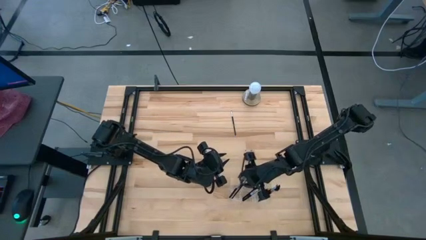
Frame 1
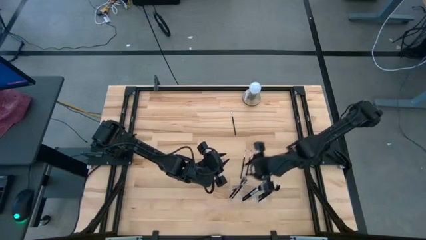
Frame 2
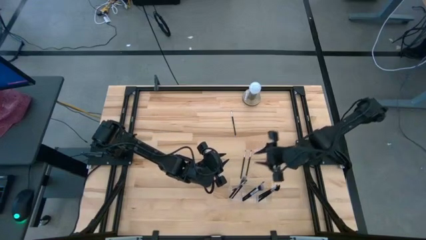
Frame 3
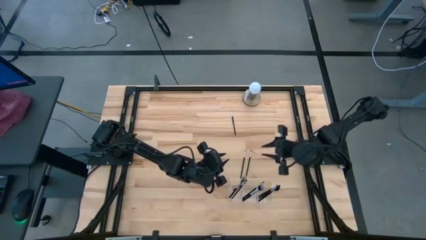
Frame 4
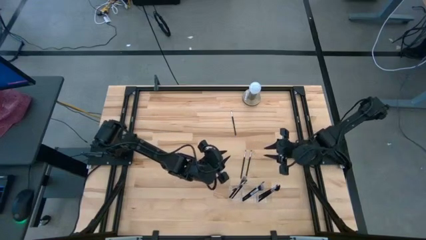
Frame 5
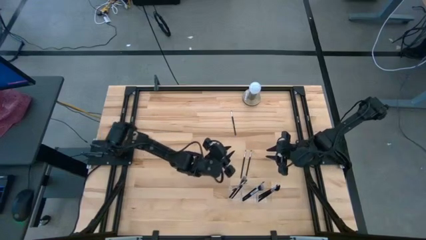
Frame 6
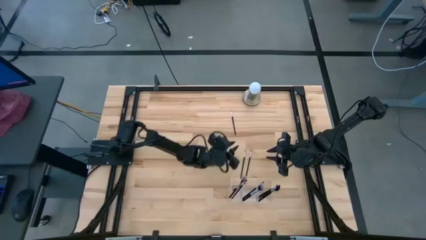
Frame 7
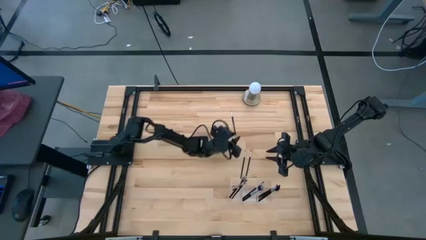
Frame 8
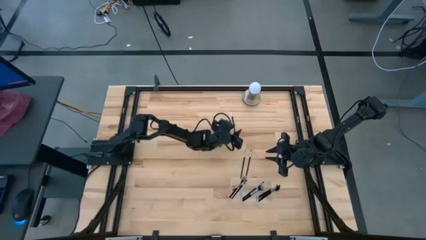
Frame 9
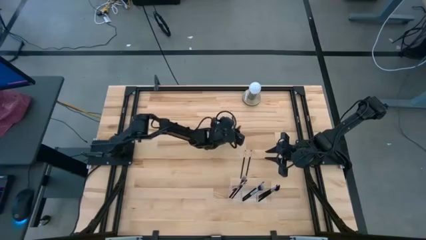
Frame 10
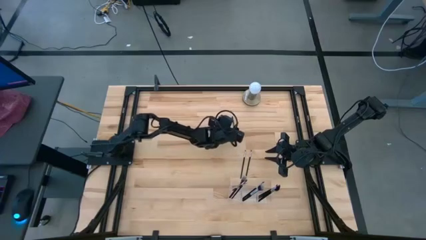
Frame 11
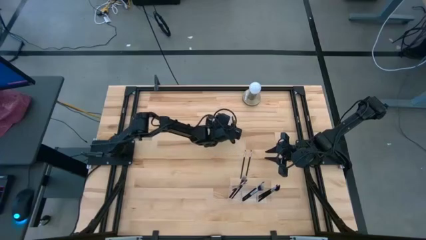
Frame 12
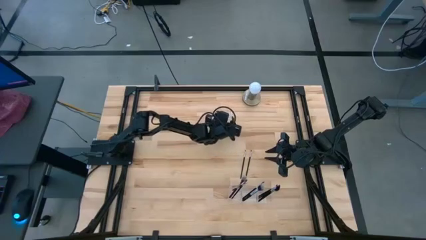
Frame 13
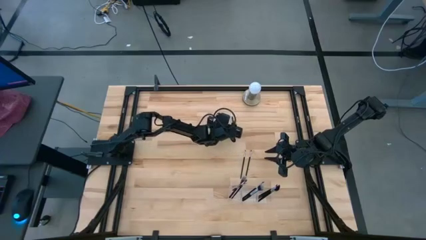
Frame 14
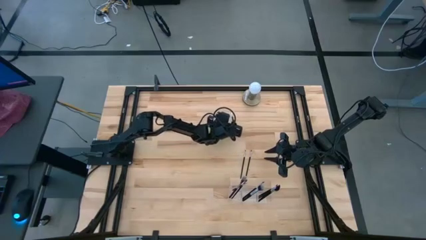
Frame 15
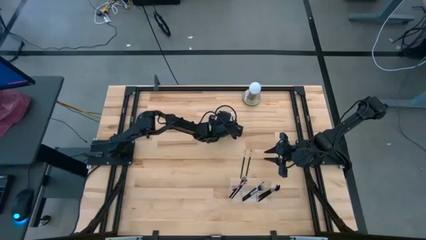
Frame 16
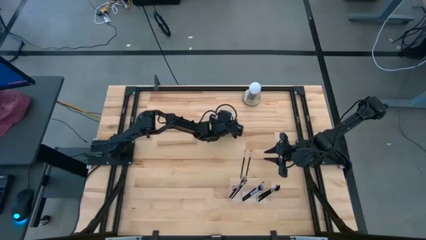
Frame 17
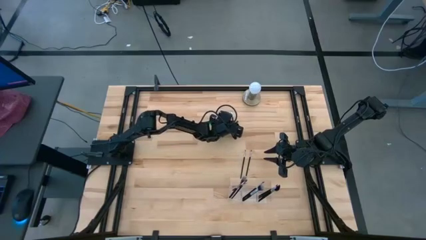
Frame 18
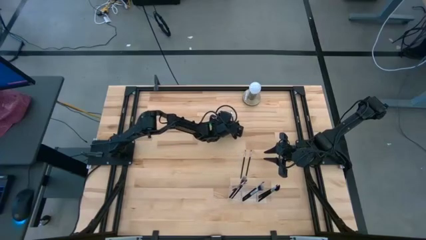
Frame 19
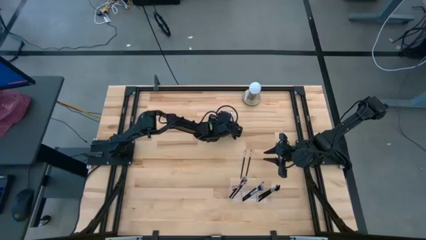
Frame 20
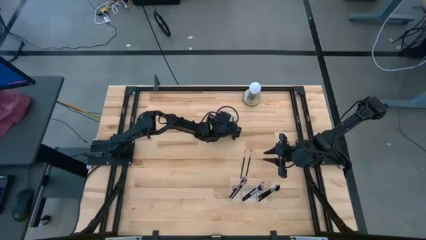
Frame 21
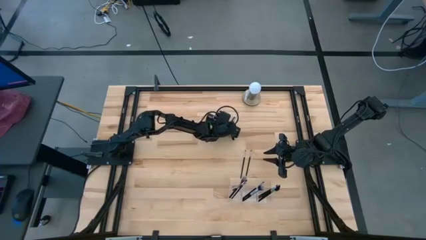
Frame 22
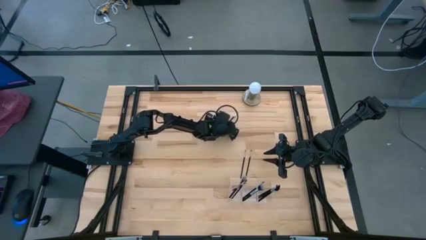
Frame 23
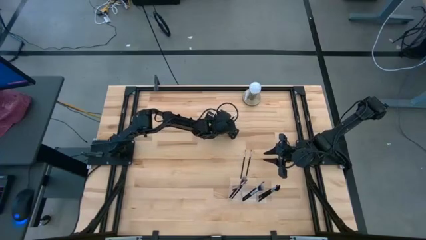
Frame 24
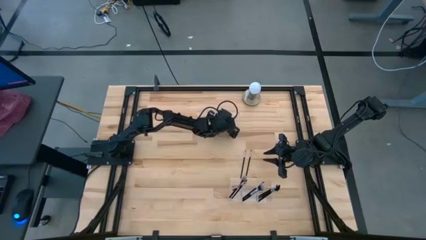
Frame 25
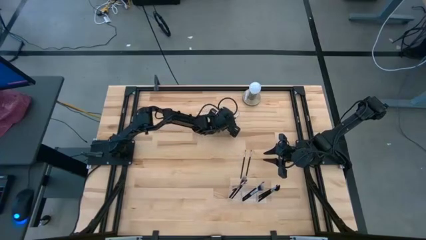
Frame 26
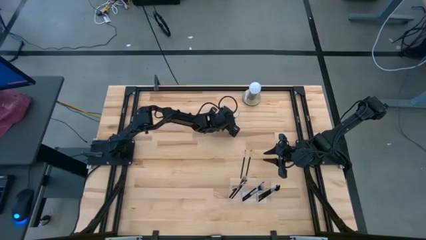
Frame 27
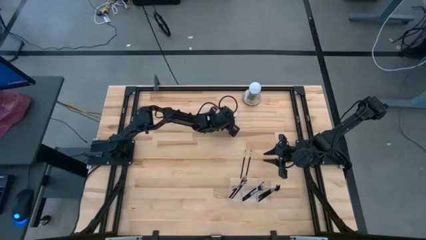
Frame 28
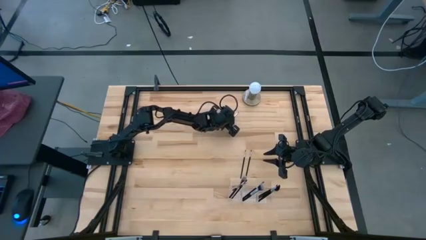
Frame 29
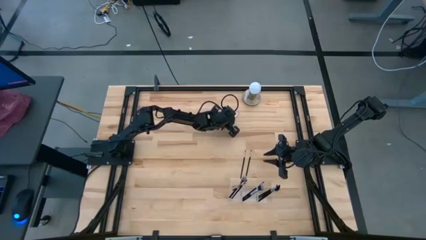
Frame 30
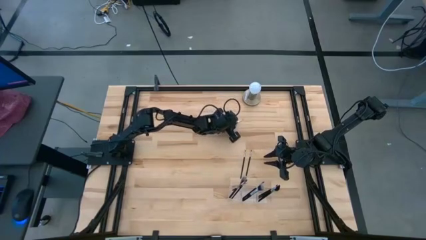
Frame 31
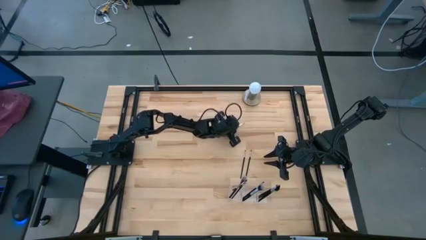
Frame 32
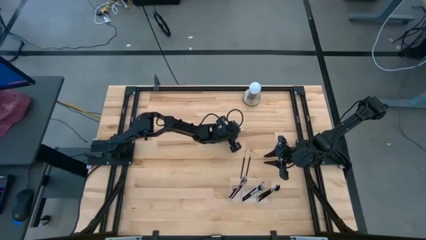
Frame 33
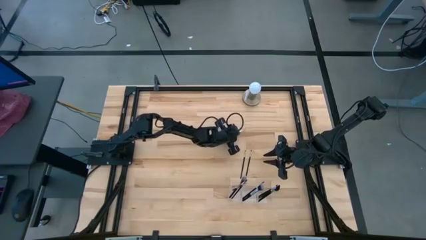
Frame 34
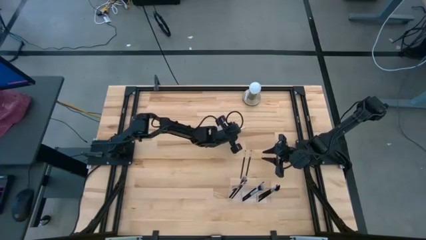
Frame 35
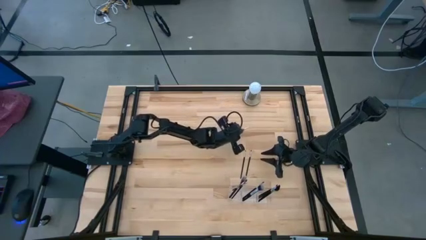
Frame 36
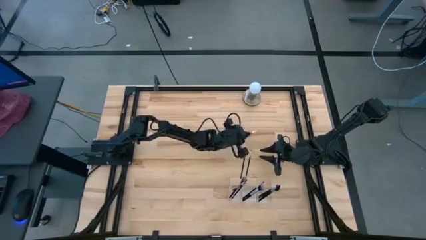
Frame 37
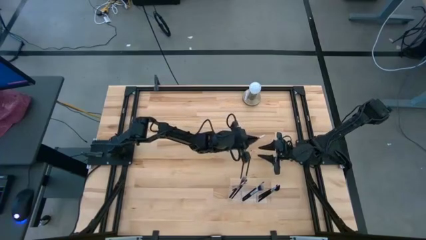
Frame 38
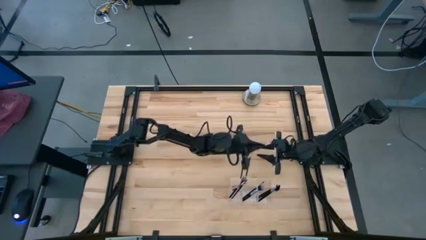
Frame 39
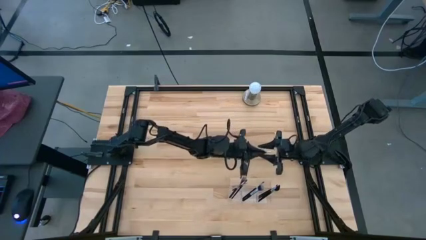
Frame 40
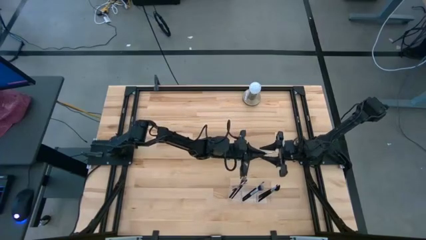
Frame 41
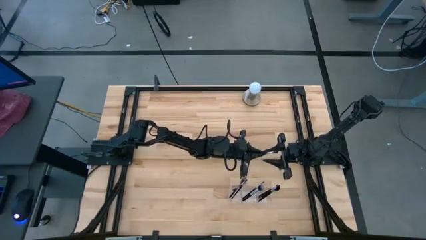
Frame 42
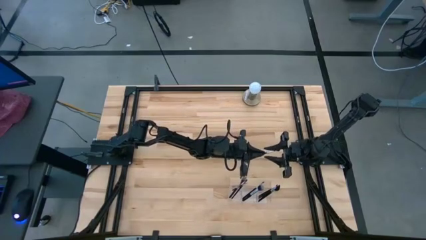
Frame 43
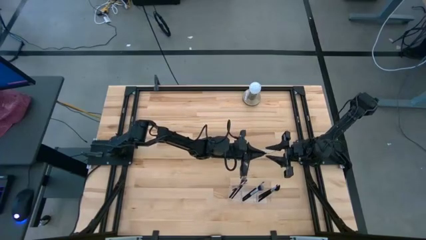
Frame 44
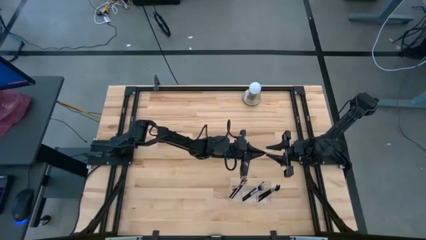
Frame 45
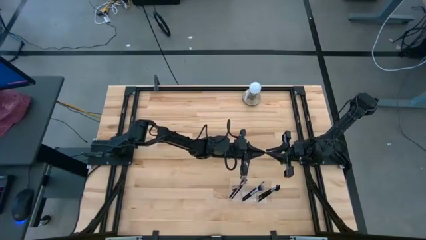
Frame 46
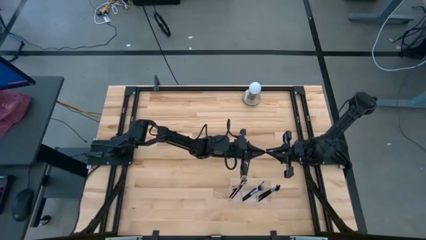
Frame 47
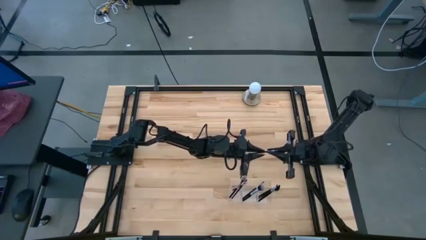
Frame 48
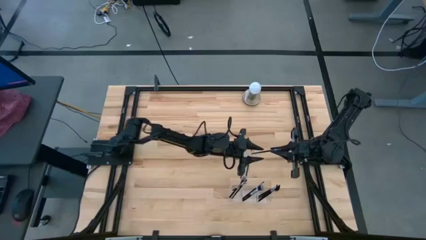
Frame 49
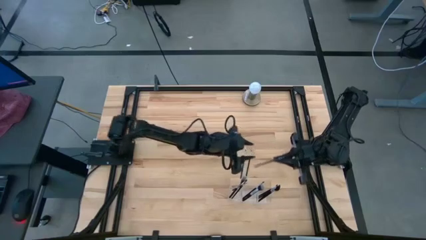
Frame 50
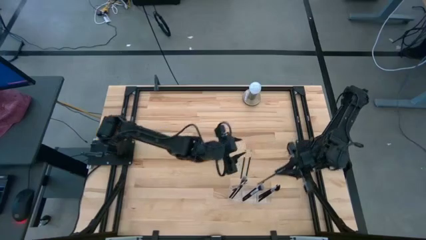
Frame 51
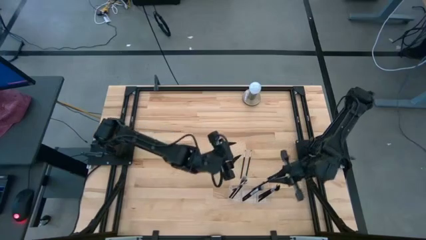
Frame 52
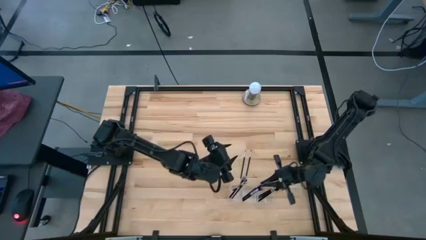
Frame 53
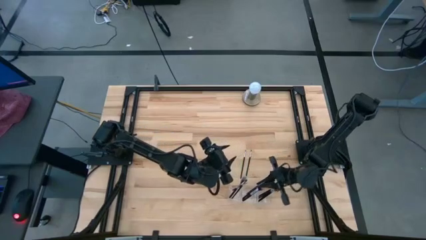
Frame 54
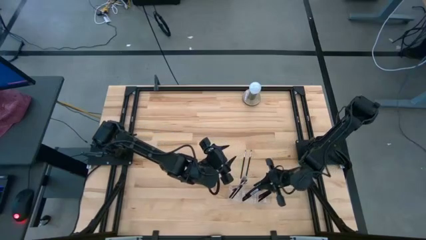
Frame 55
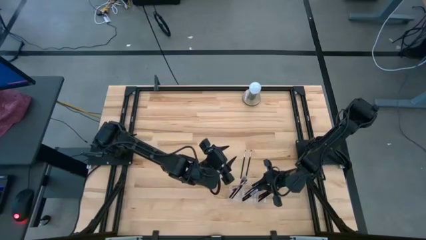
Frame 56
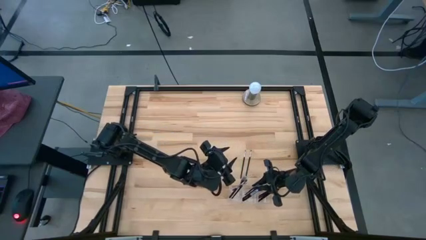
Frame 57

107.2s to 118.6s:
Task: Put items in baskets/containers
Put the eyeshadow brush into the middle section of the transparent organizer

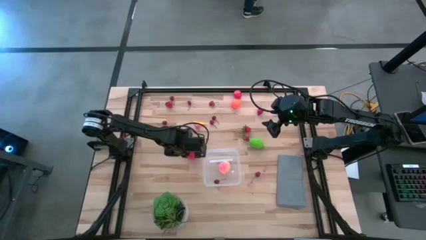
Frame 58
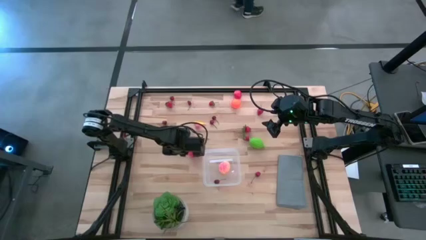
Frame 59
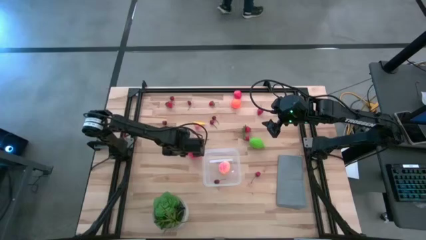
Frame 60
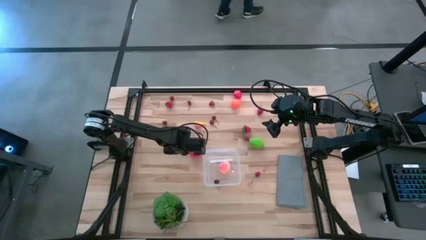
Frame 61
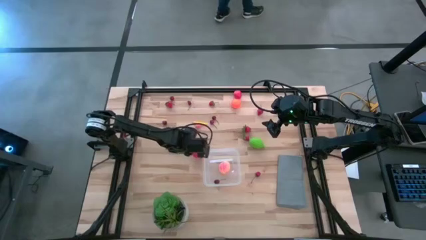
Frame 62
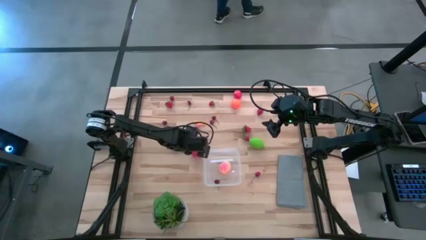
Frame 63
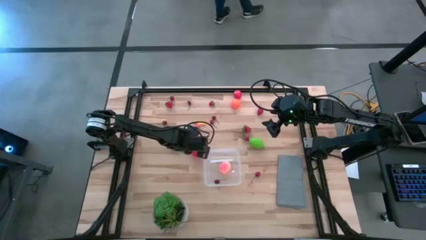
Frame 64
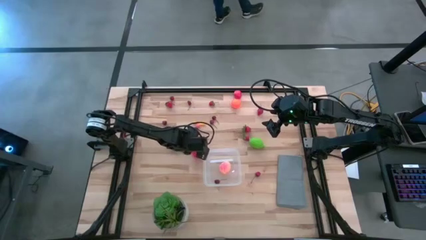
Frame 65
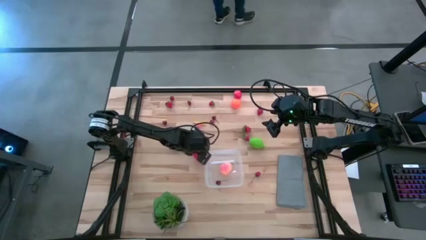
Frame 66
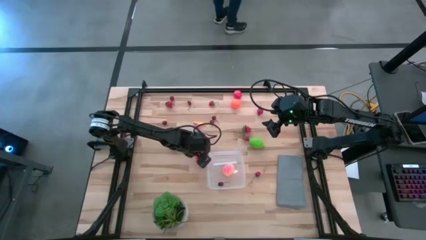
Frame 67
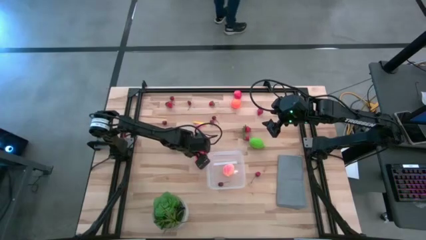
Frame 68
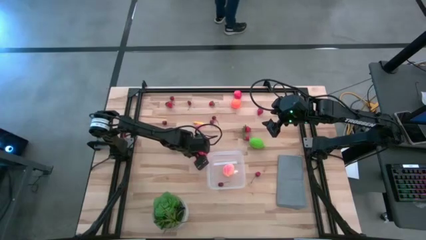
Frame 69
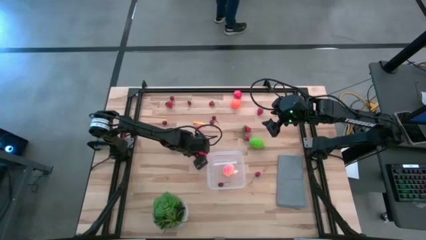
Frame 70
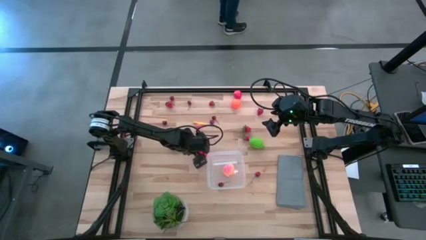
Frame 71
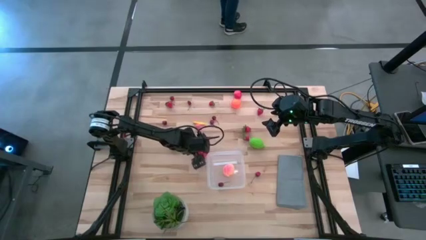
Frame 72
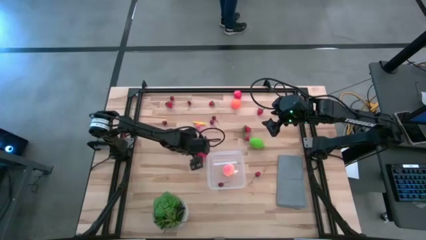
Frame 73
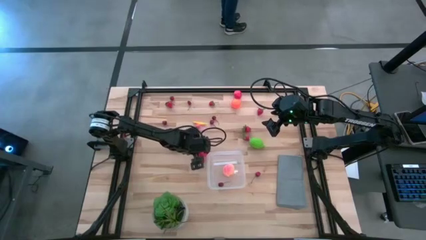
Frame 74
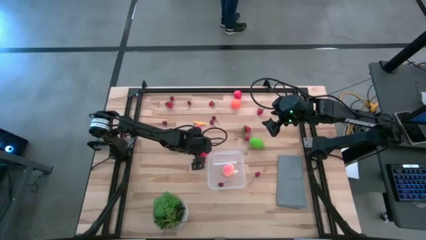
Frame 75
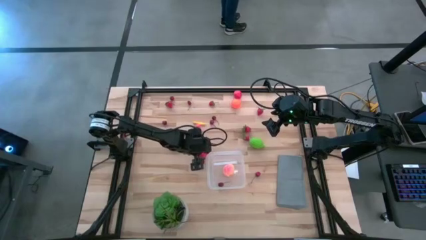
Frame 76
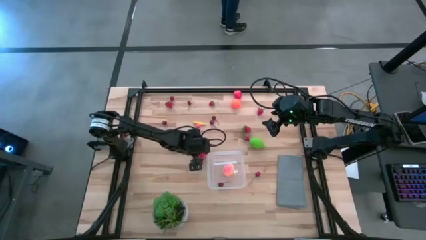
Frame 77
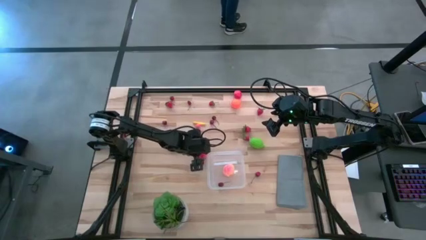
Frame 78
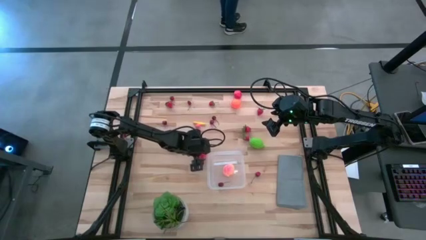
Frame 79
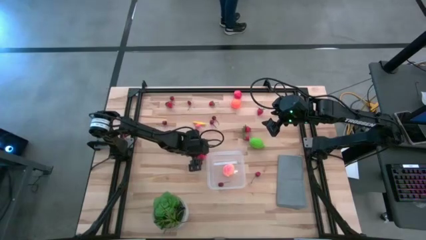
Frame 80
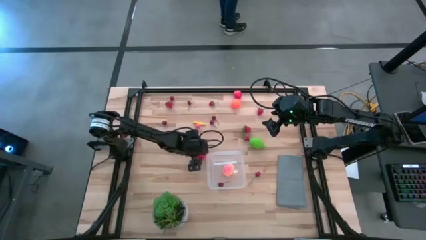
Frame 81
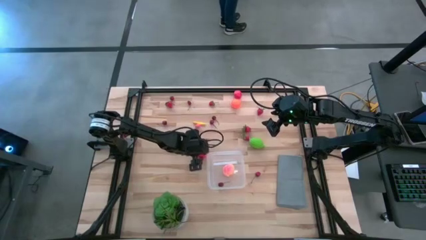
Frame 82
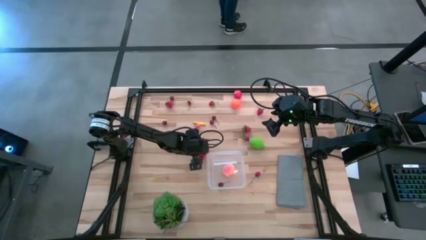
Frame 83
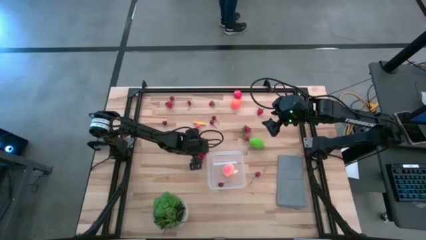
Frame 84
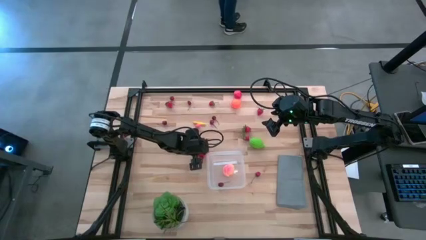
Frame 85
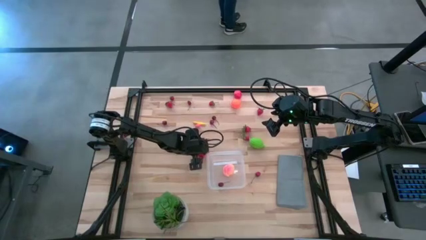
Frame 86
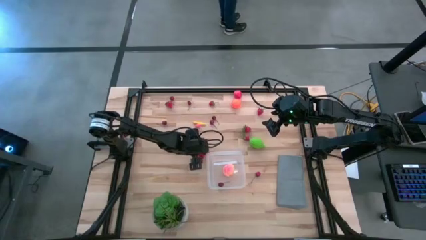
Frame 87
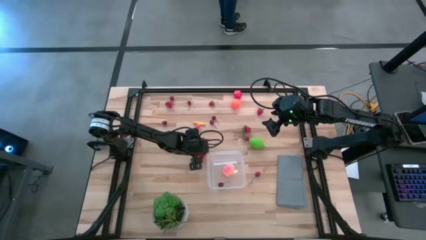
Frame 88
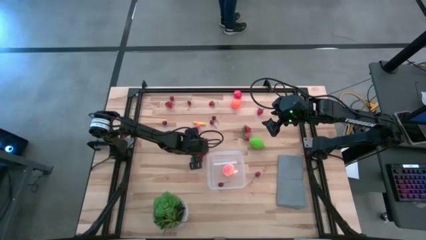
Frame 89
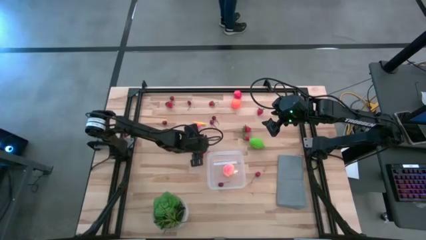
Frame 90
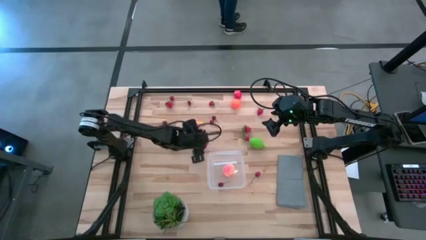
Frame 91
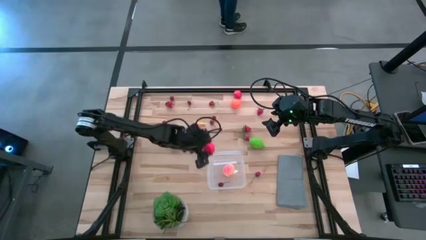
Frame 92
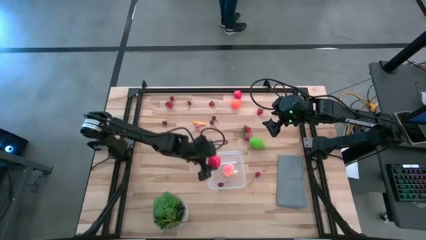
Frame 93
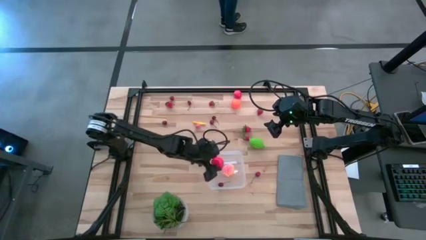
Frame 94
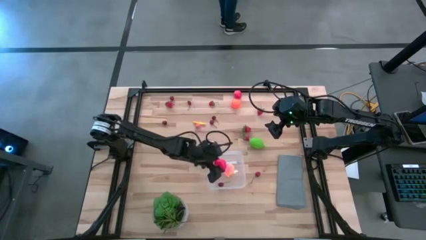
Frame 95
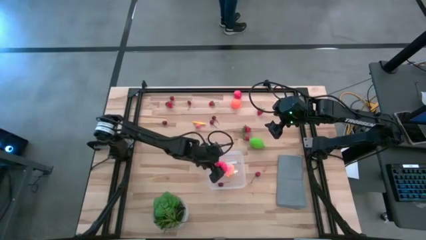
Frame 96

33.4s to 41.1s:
Task: Pick and placing Produce into tupperware
Put the red apple into the transparent bin
